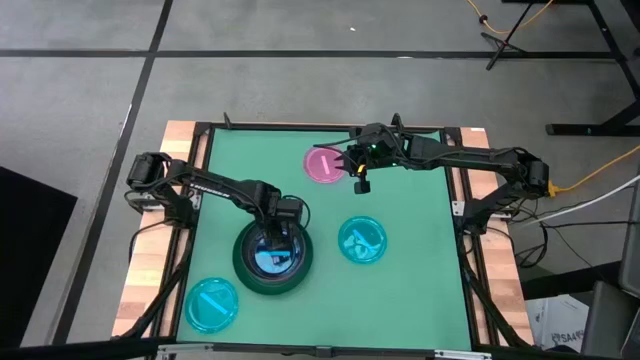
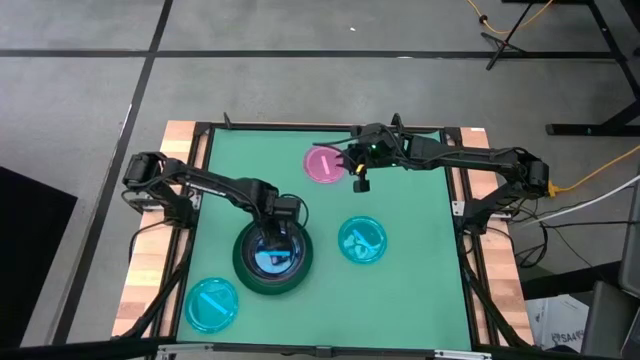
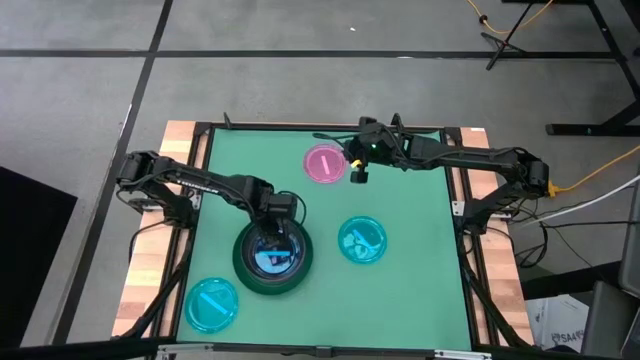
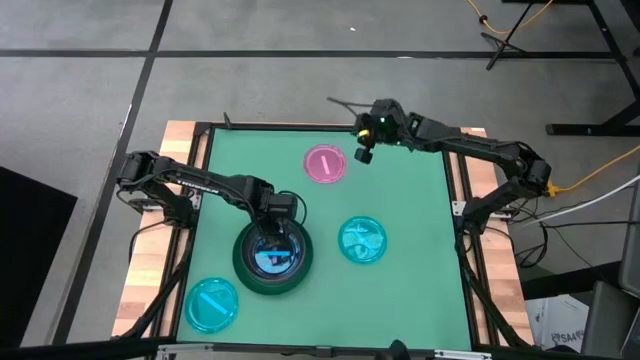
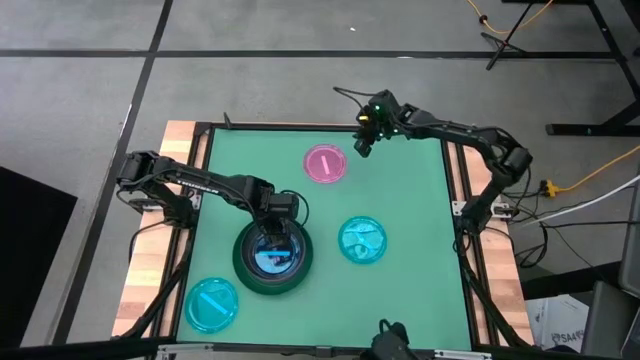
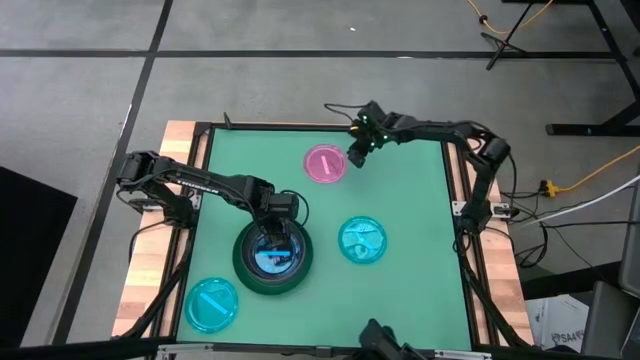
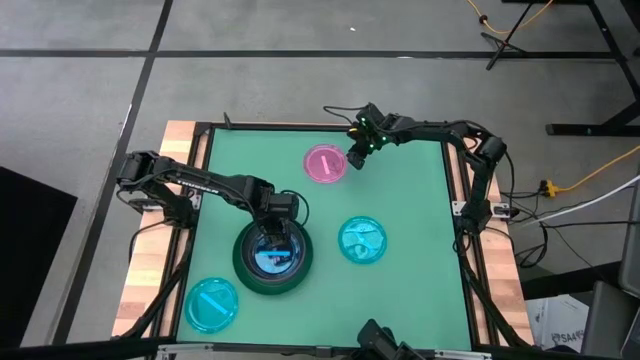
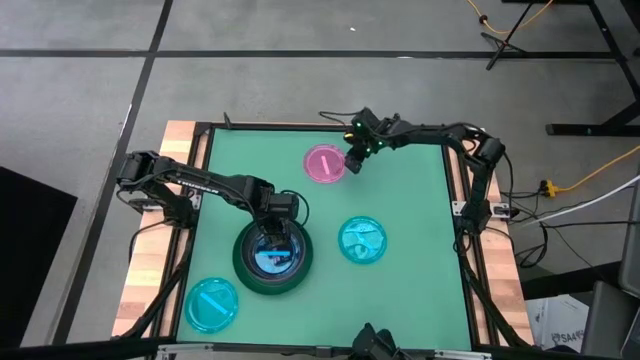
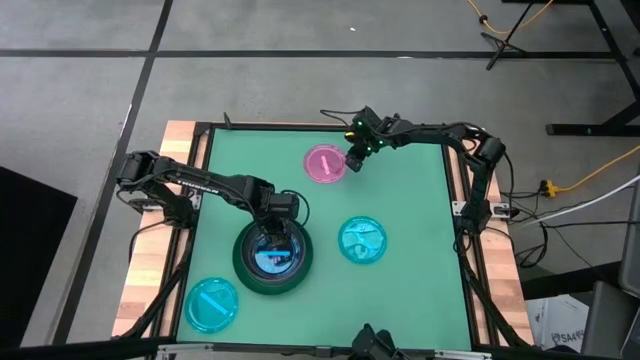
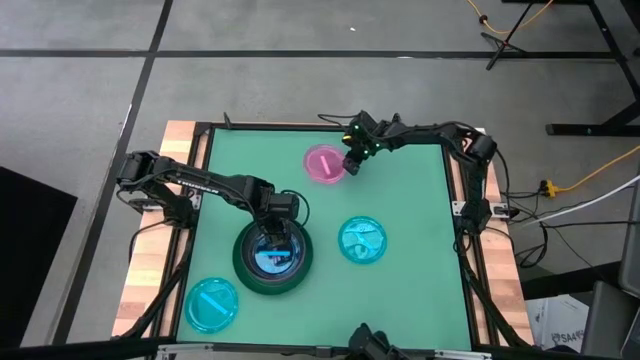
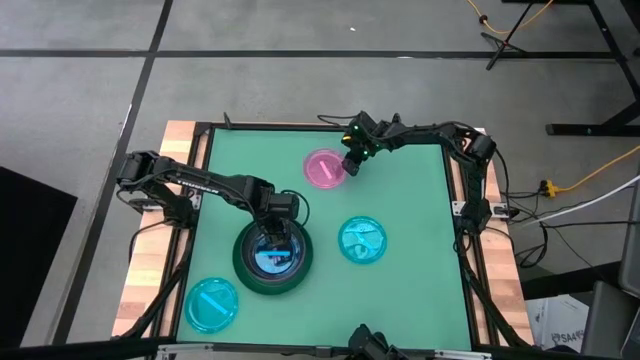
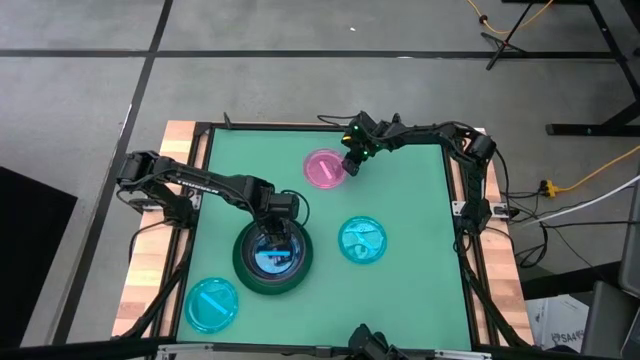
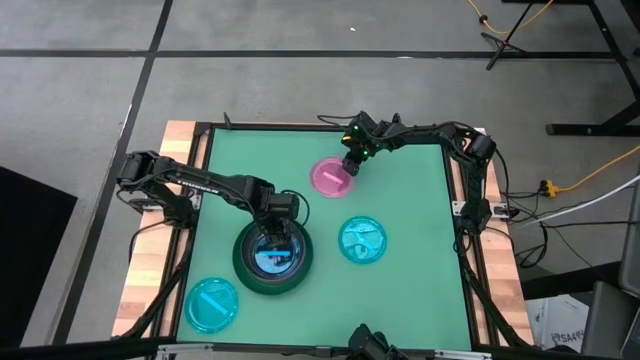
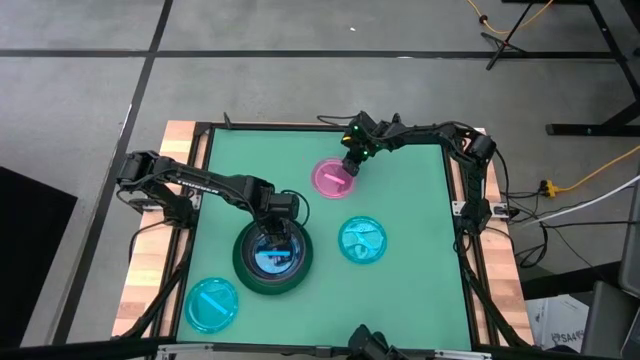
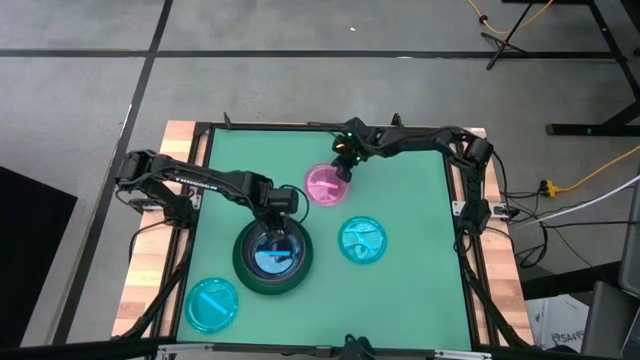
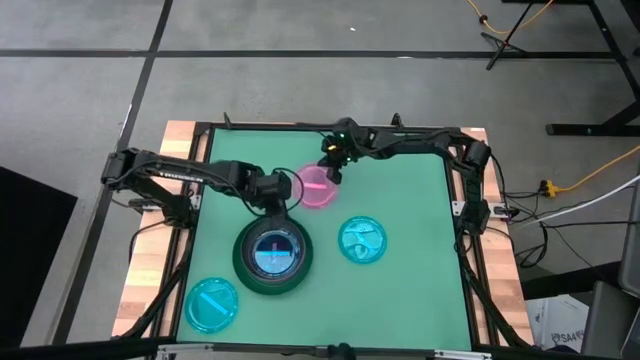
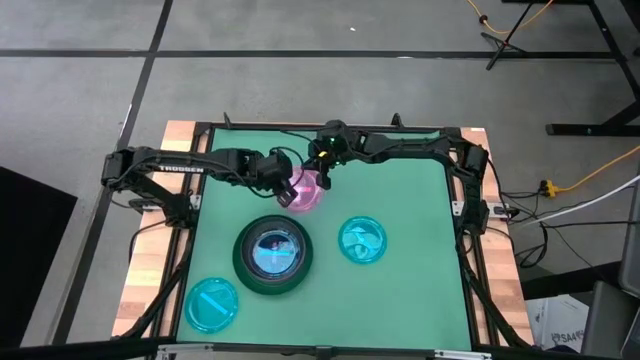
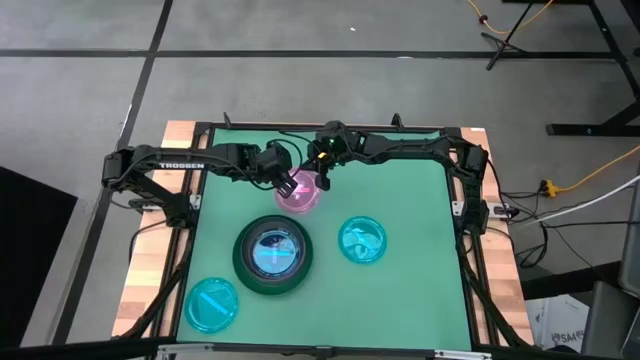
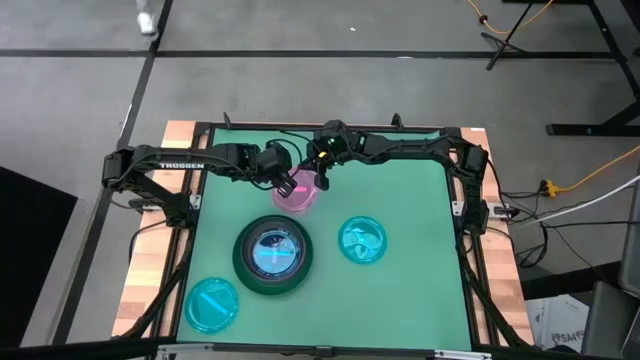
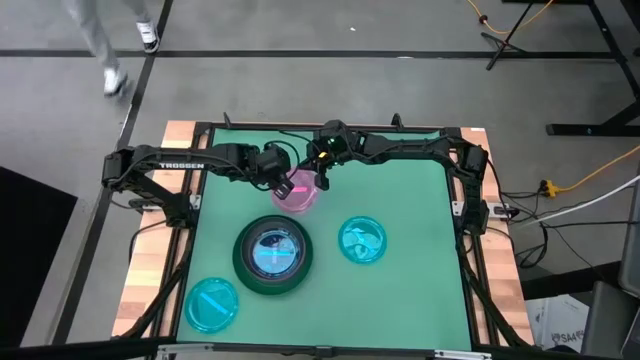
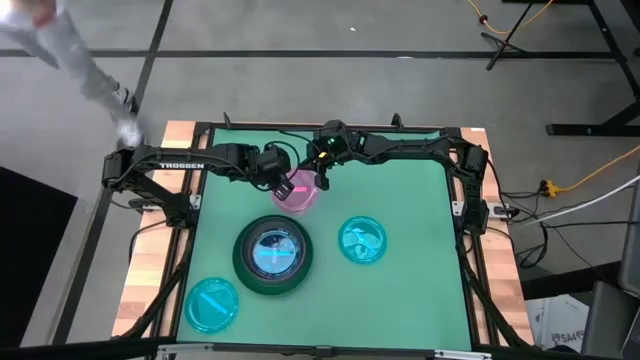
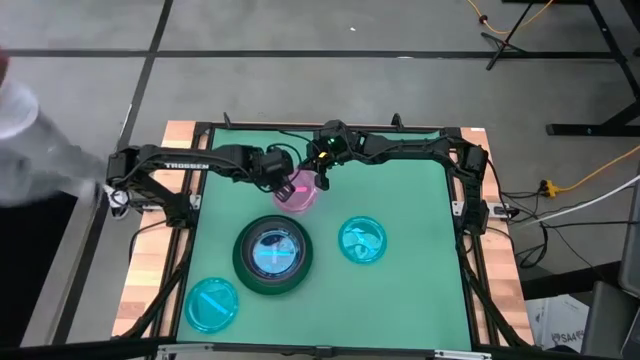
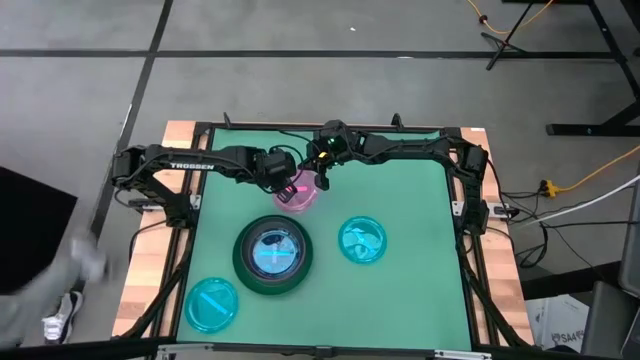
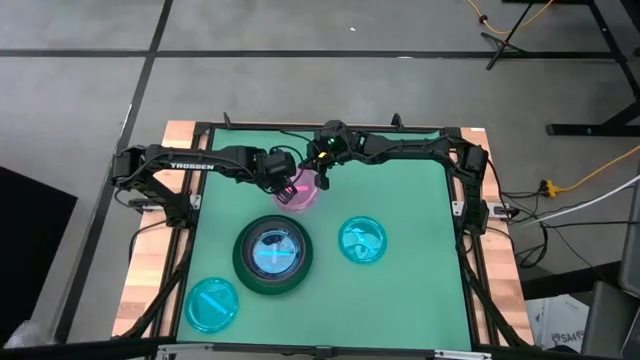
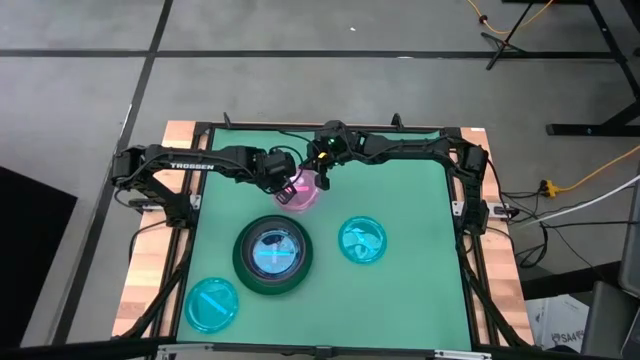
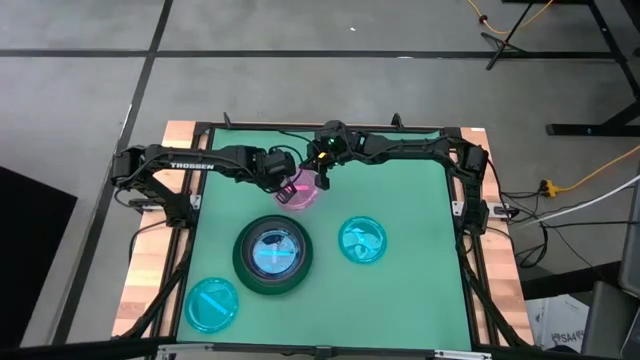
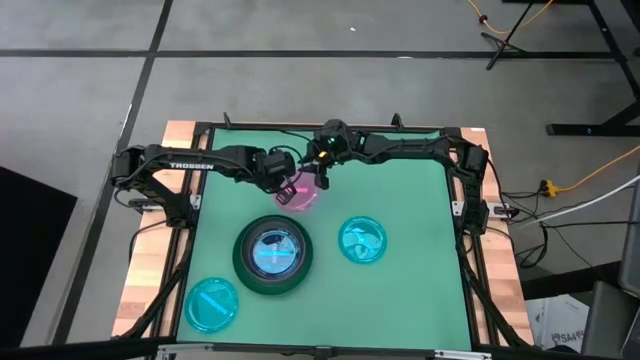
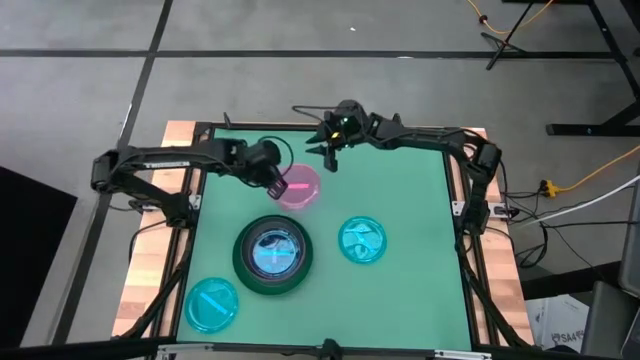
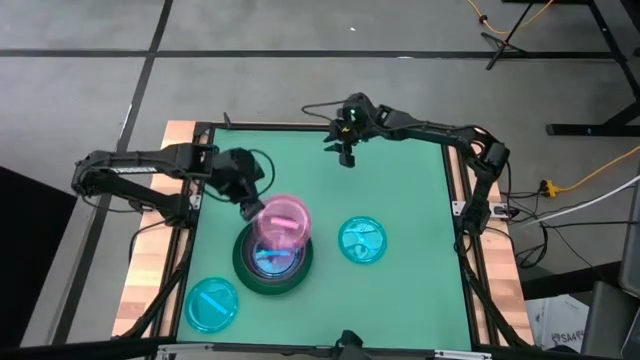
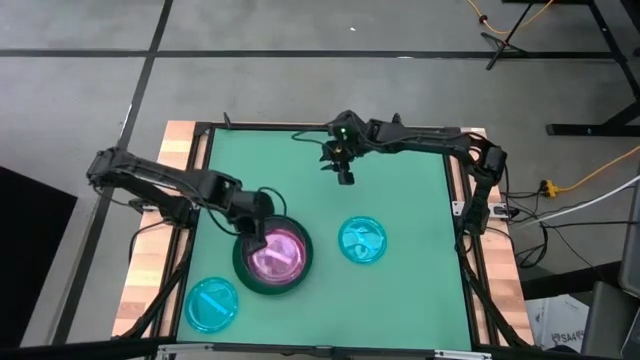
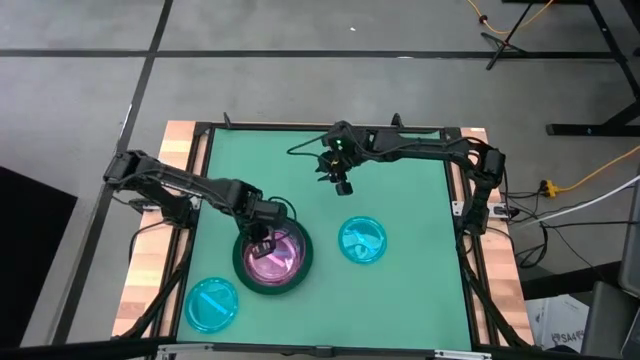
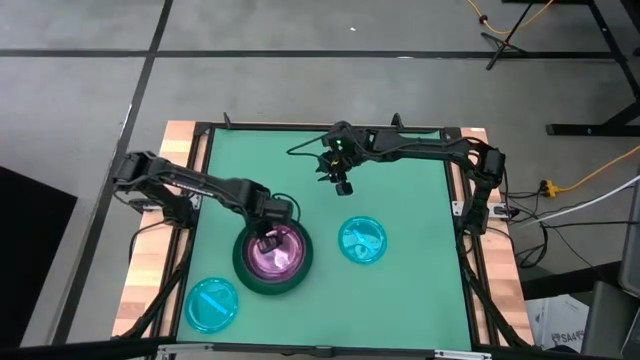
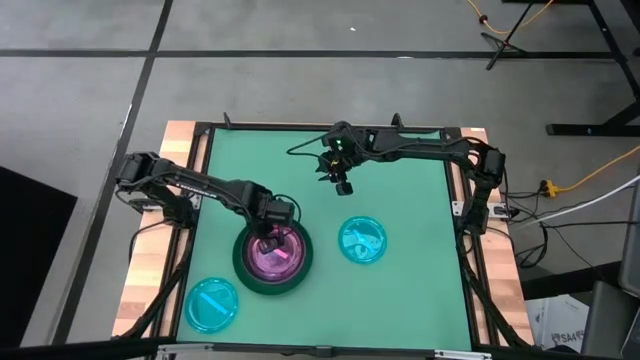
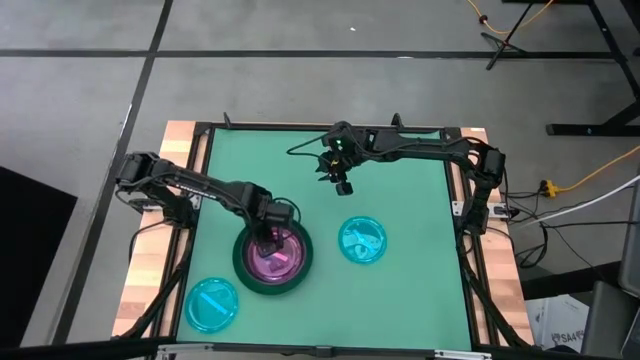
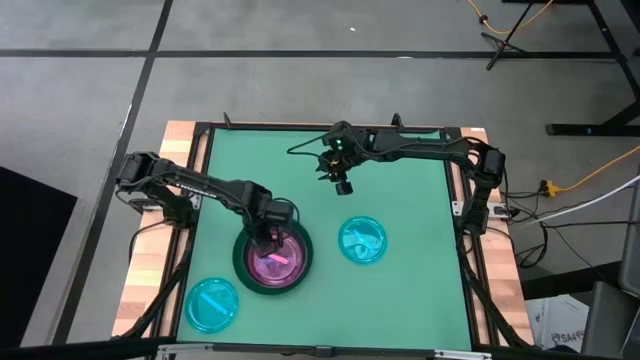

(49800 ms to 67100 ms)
Task: Stack plastic plates
Stack the light pink plate on top of the stacked light blue plate

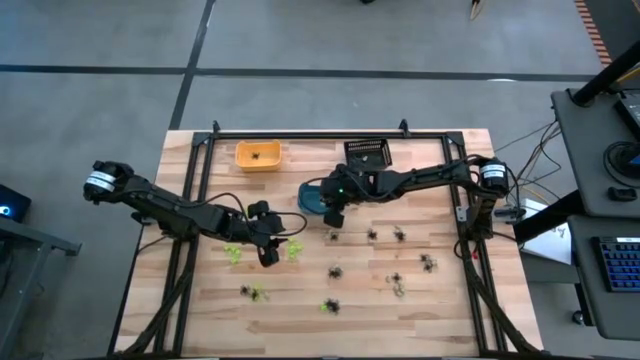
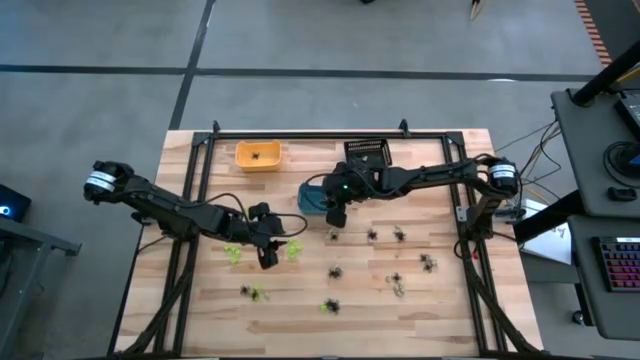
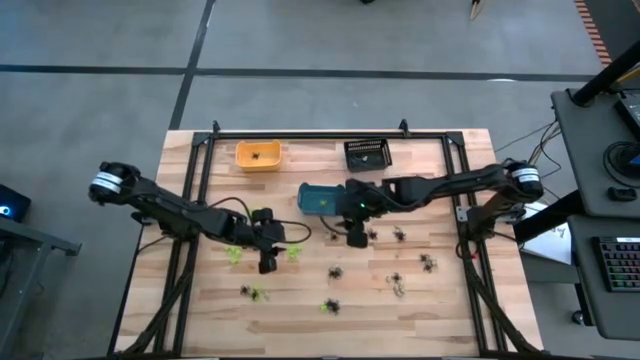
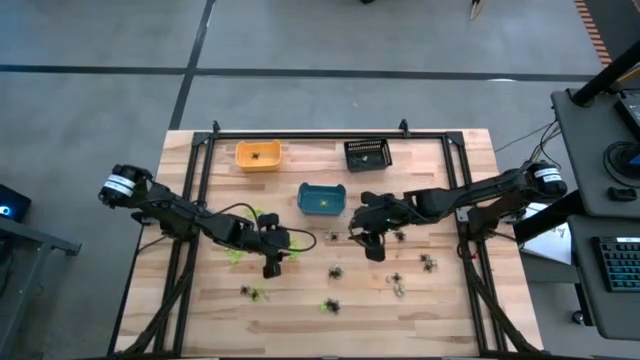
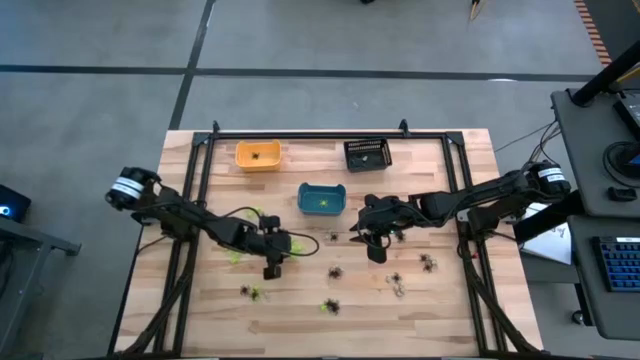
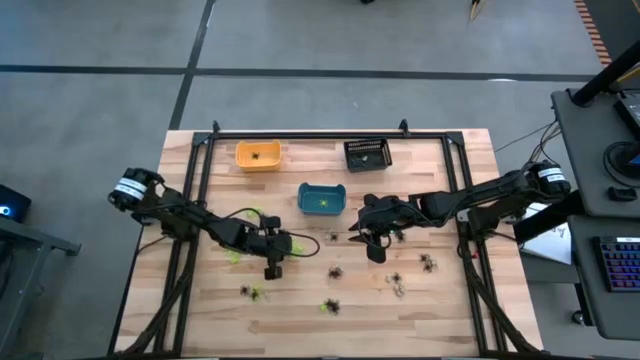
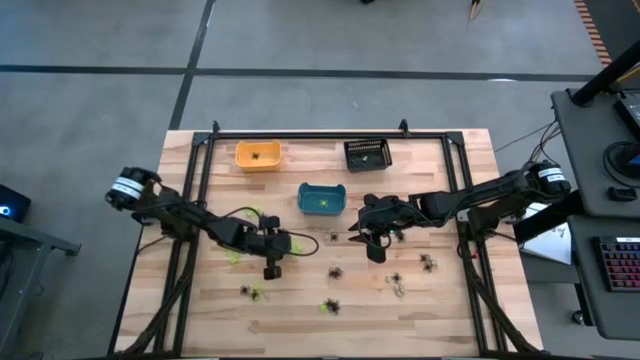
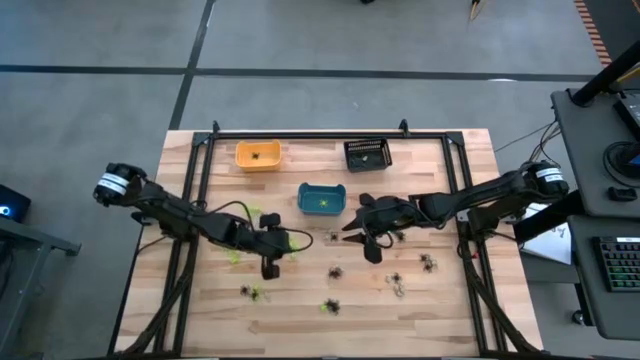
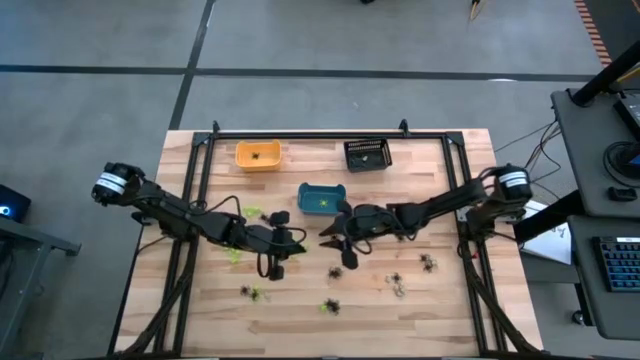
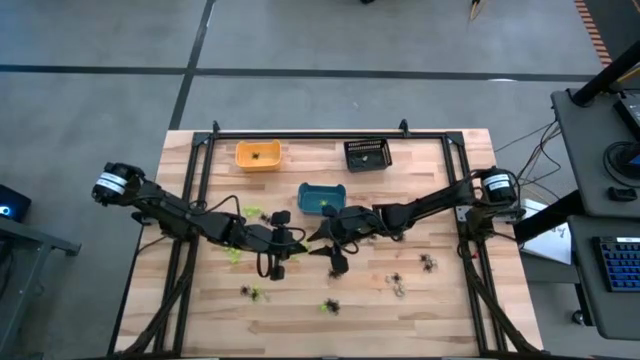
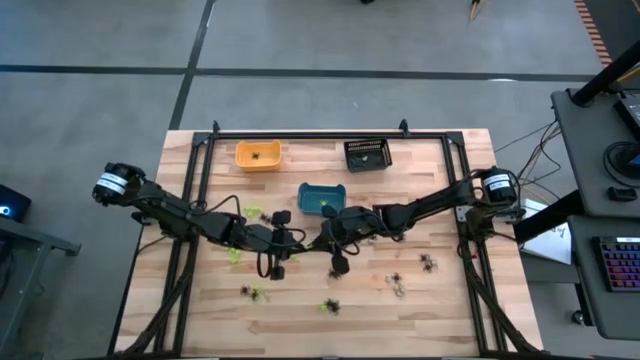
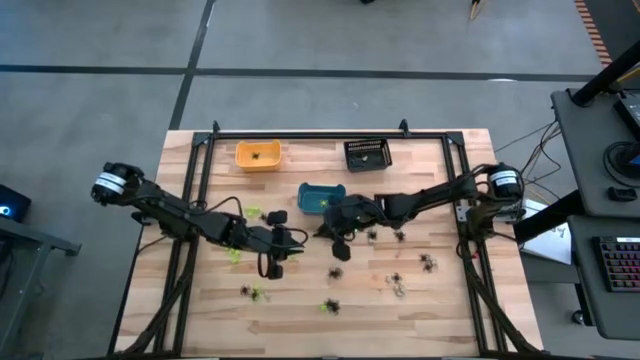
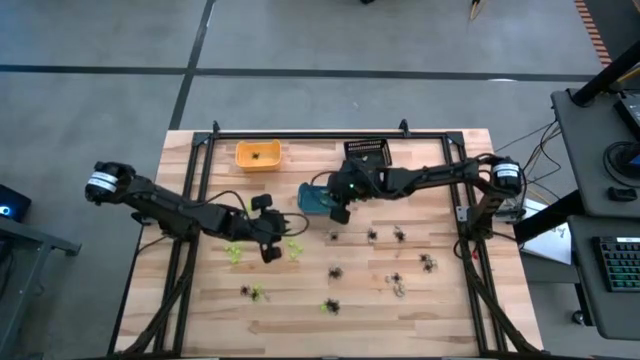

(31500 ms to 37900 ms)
Task: Sort Halloween decoration
Put the green spider toy into the blue bin
